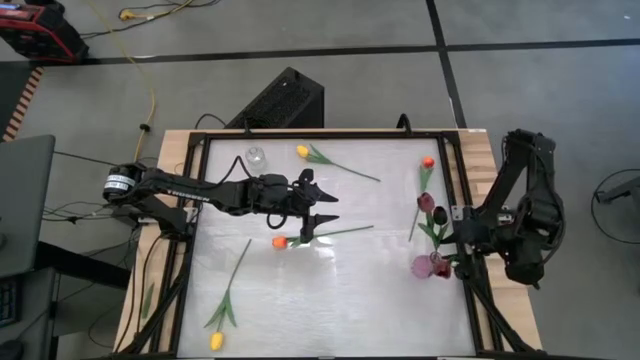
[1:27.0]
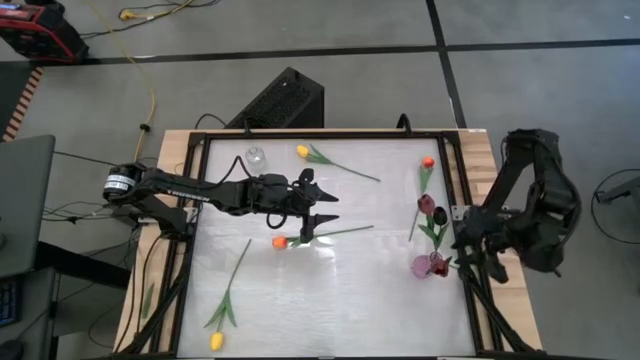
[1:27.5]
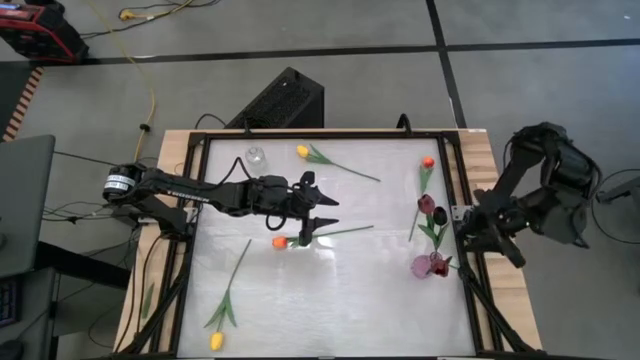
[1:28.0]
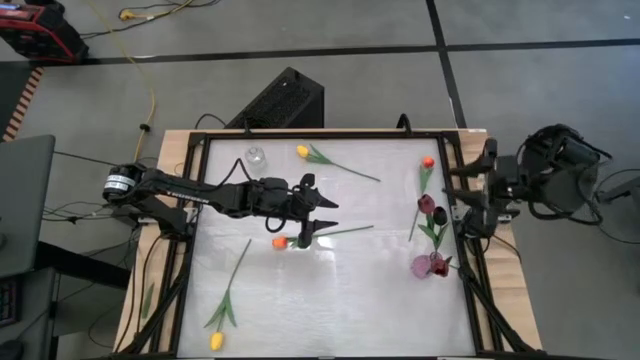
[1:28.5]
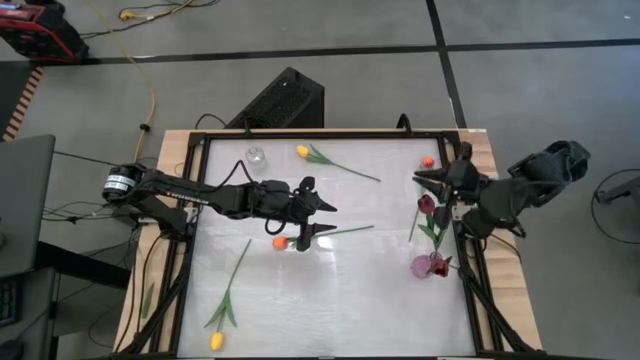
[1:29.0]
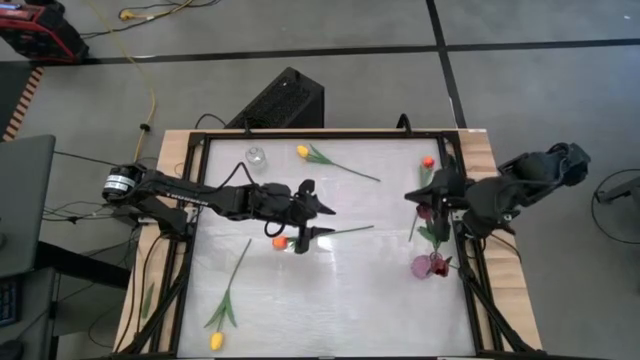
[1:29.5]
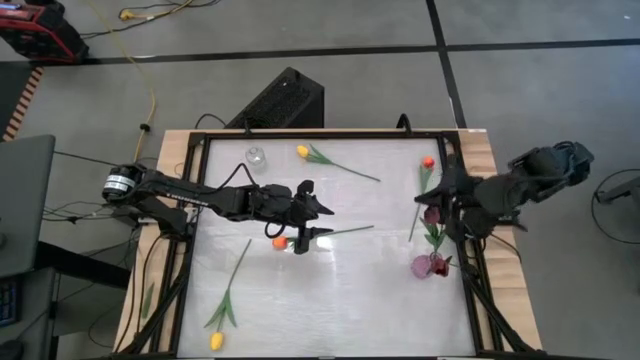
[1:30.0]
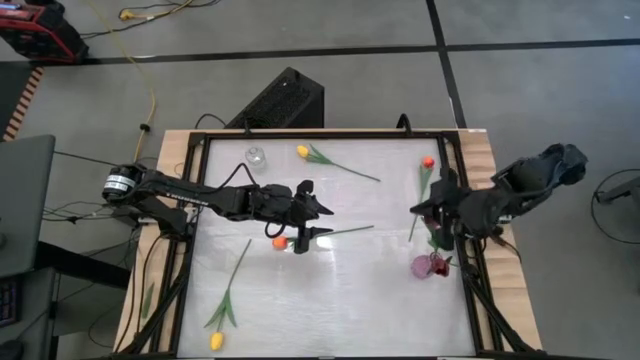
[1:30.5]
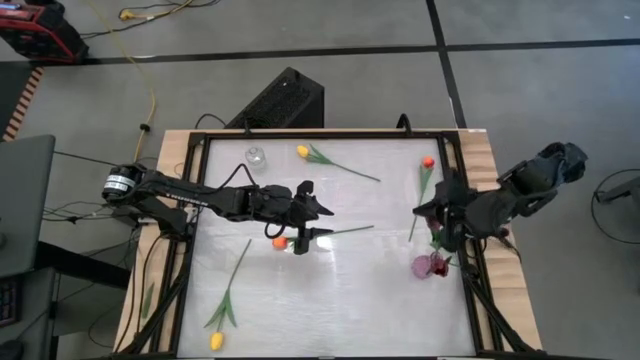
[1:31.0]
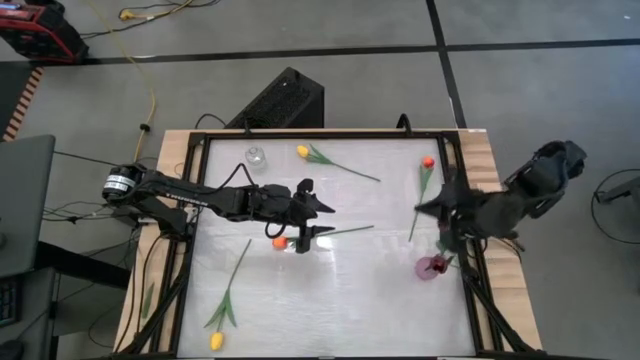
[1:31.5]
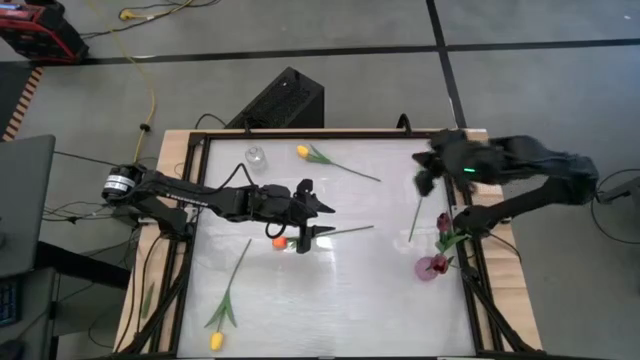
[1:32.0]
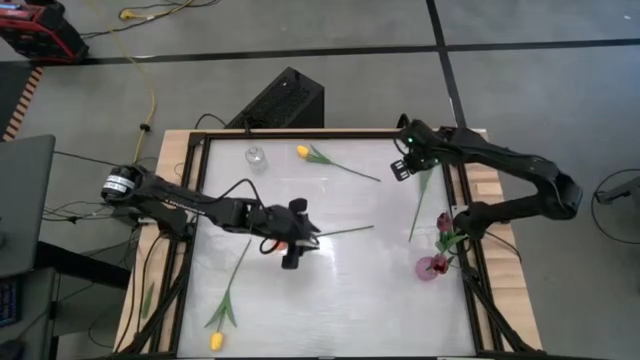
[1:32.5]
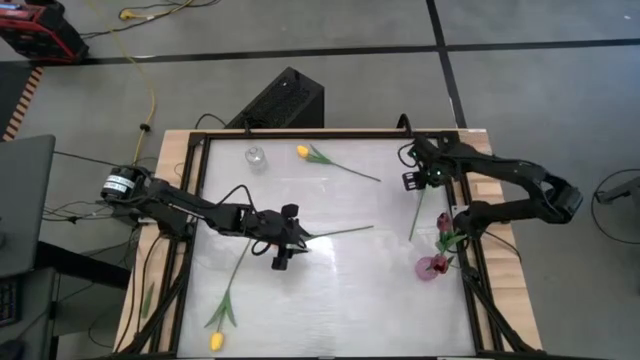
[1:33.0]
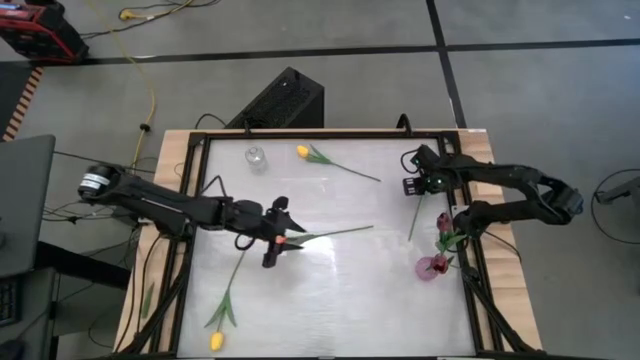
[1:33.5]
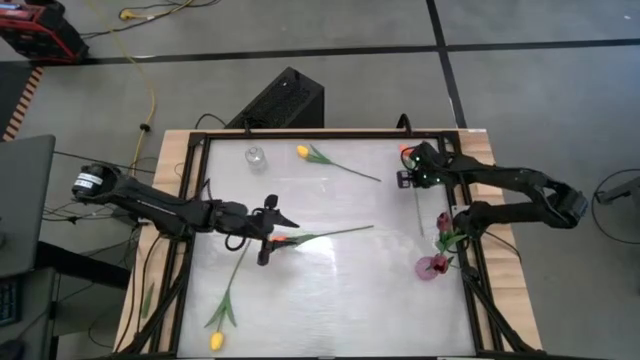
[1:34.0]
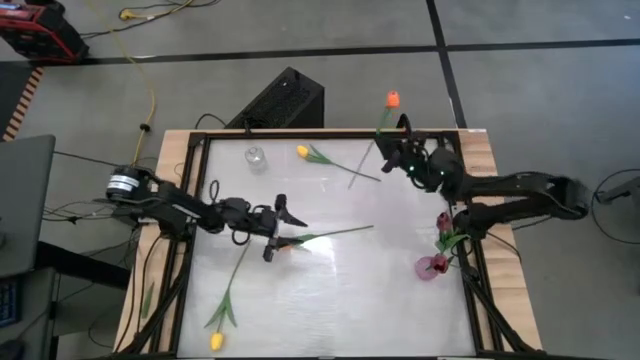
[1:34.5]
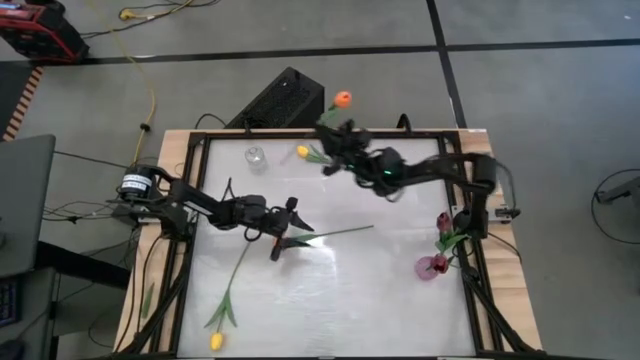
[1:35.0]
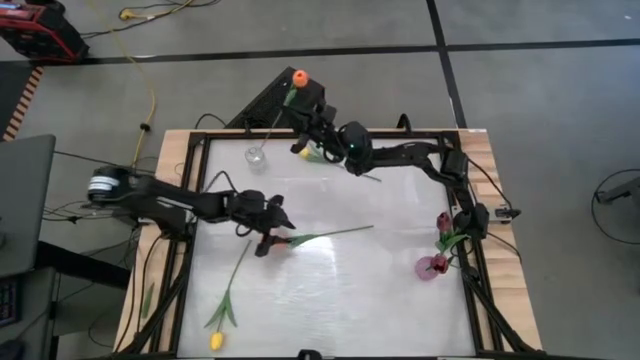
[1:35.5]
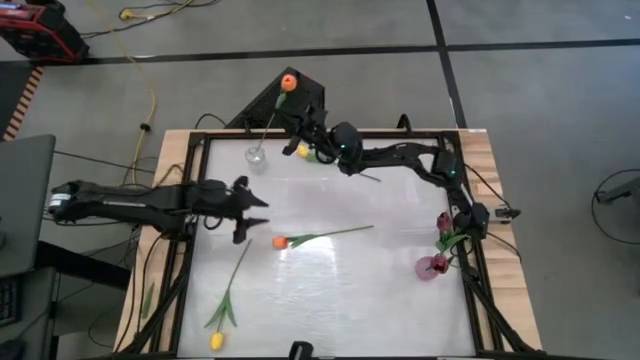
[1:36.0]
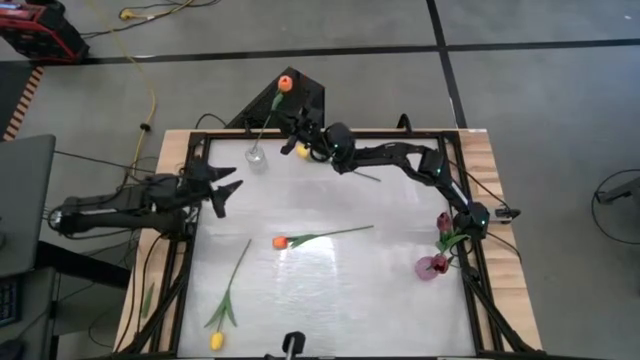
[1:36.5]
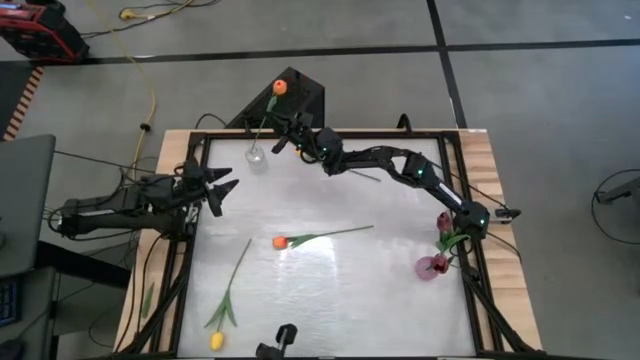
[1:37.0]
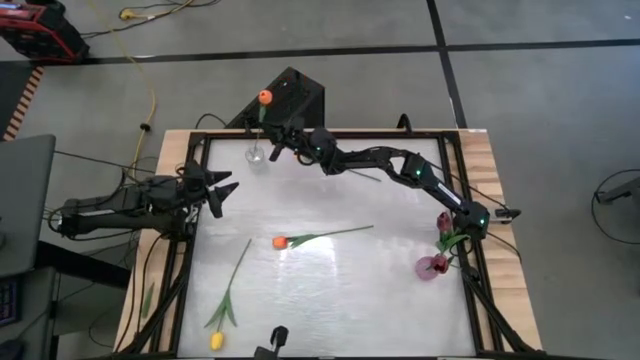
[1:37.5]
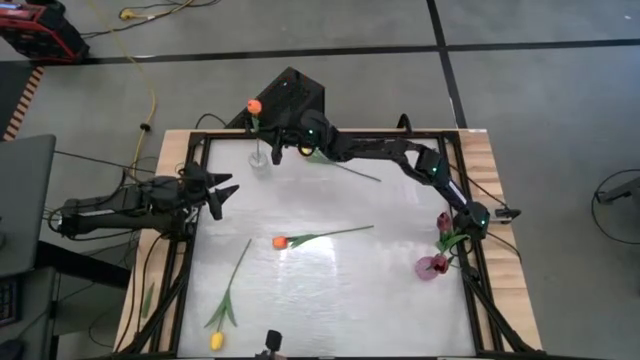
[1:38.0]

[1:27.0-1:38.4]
Task: Sort flowers into vase by color
Put the top orange flower into the transparent vase

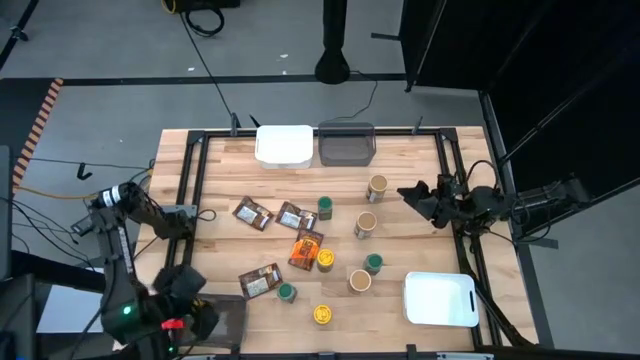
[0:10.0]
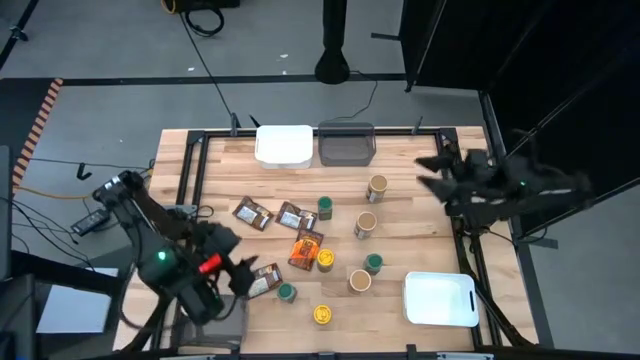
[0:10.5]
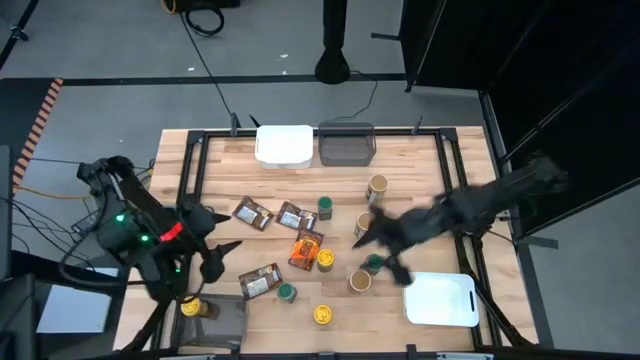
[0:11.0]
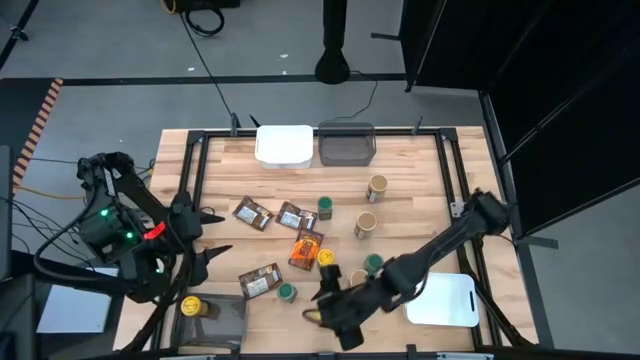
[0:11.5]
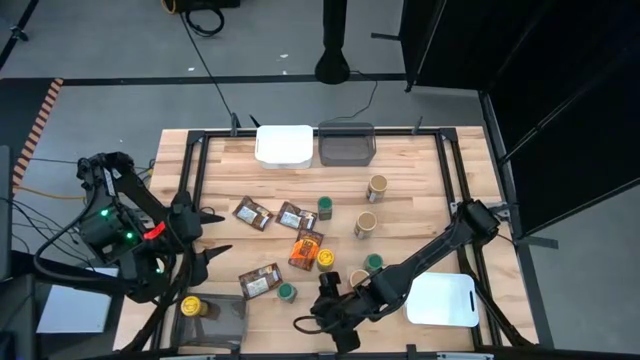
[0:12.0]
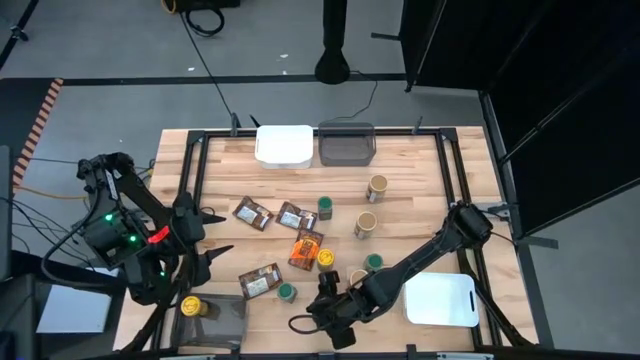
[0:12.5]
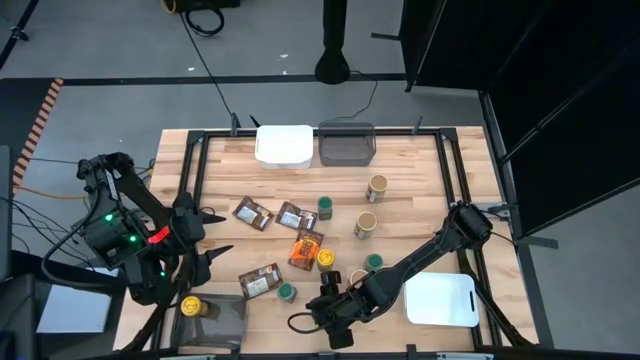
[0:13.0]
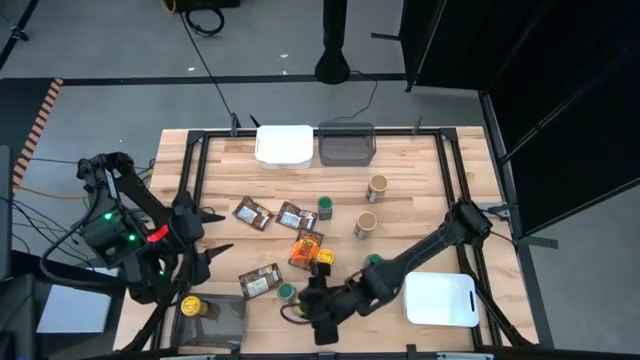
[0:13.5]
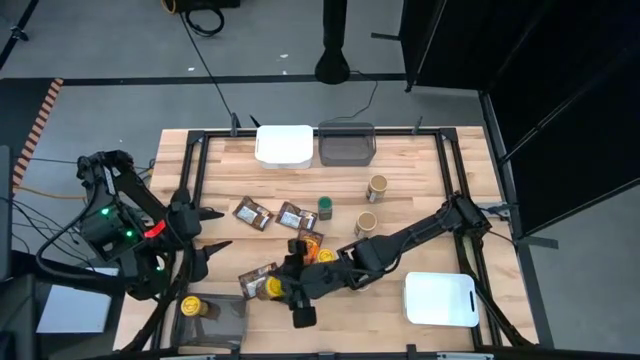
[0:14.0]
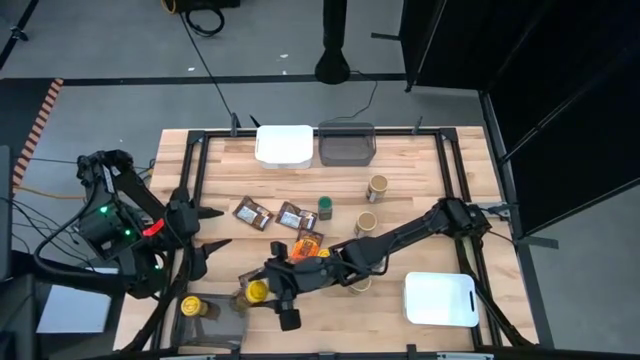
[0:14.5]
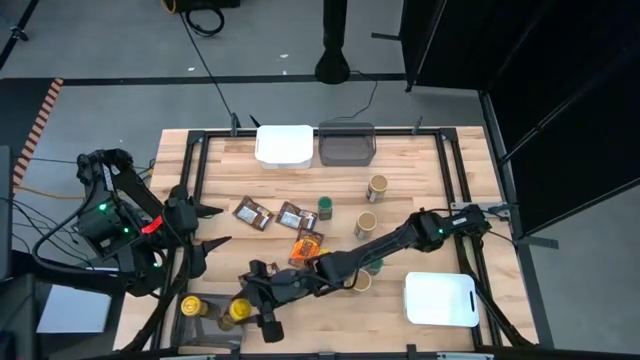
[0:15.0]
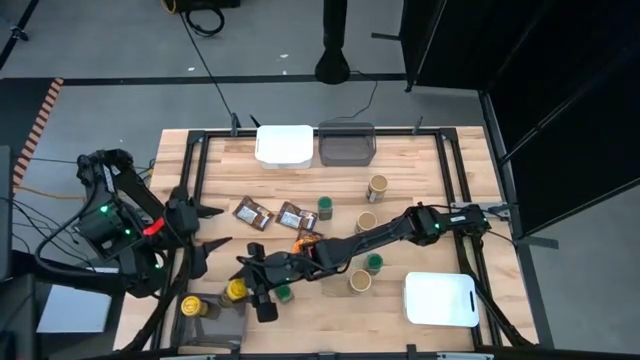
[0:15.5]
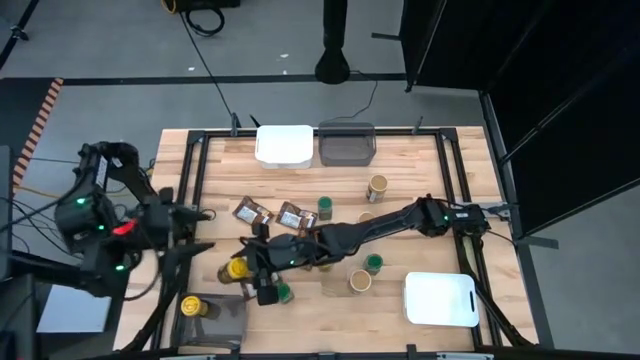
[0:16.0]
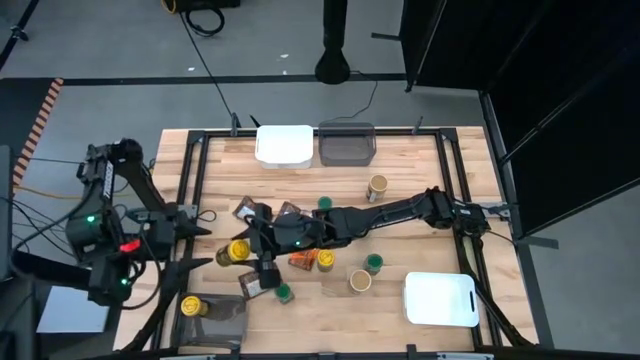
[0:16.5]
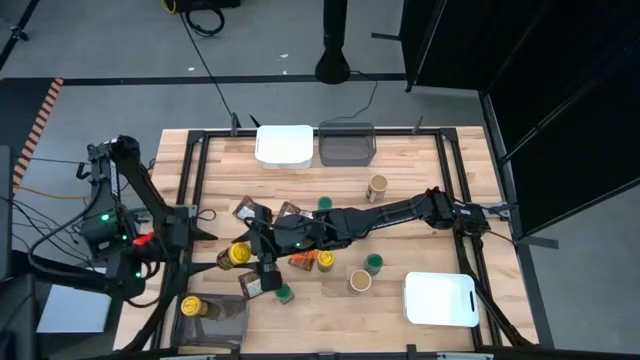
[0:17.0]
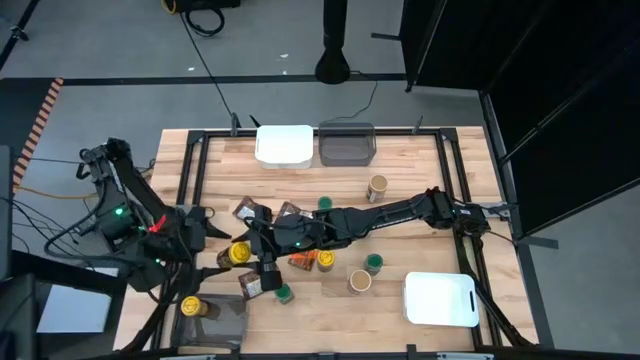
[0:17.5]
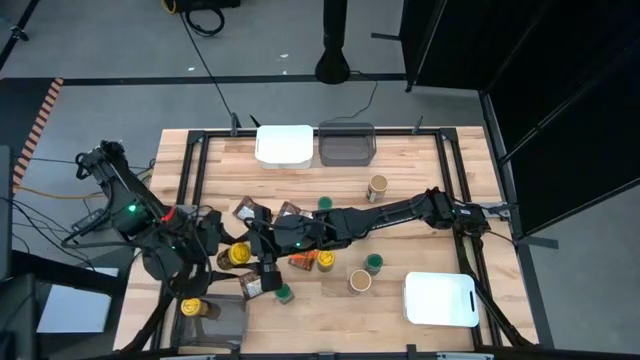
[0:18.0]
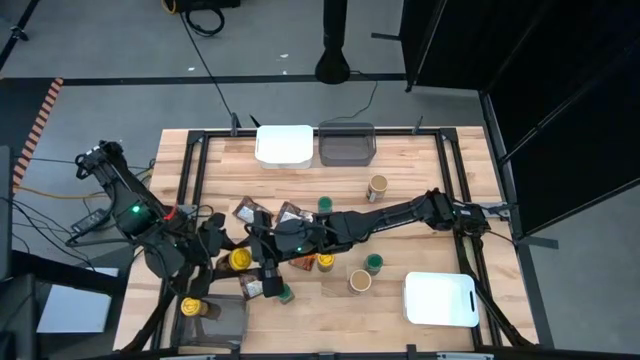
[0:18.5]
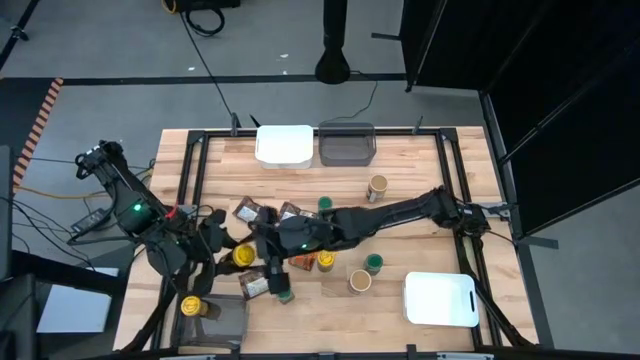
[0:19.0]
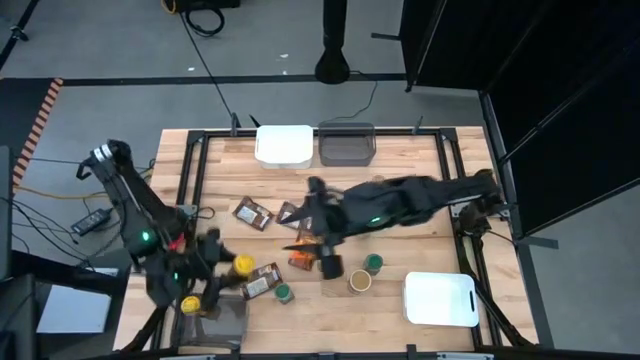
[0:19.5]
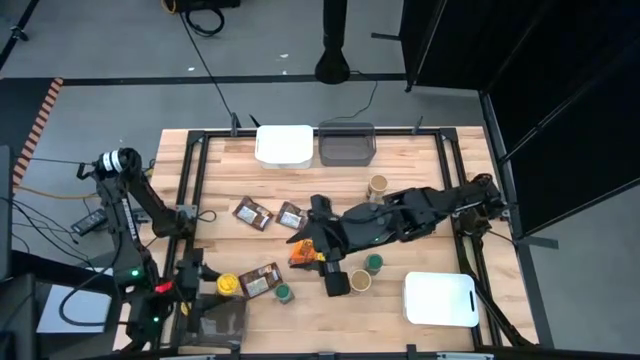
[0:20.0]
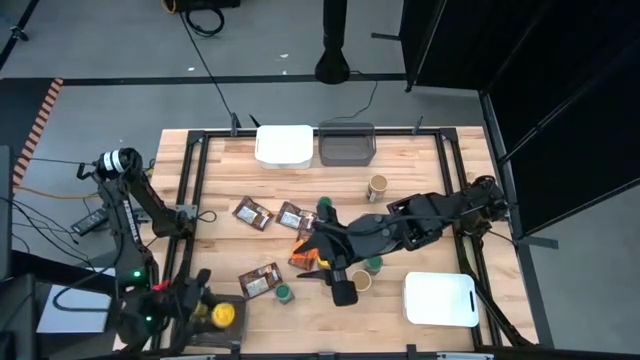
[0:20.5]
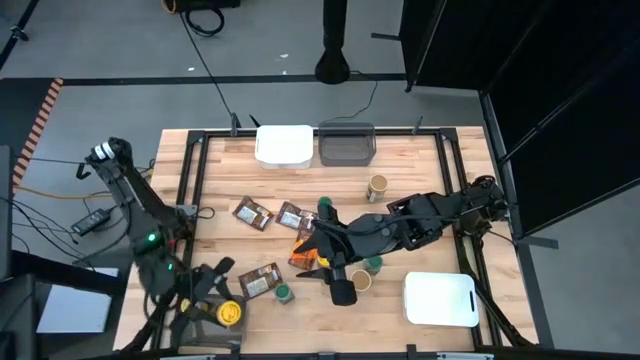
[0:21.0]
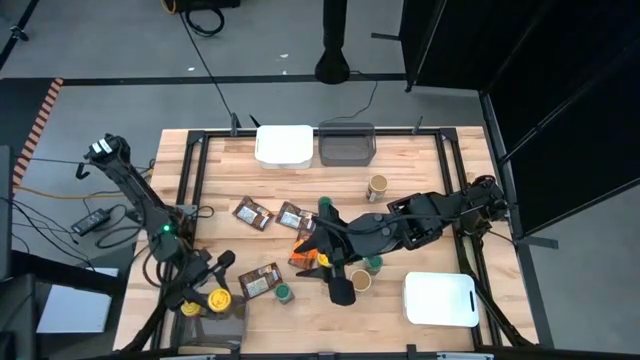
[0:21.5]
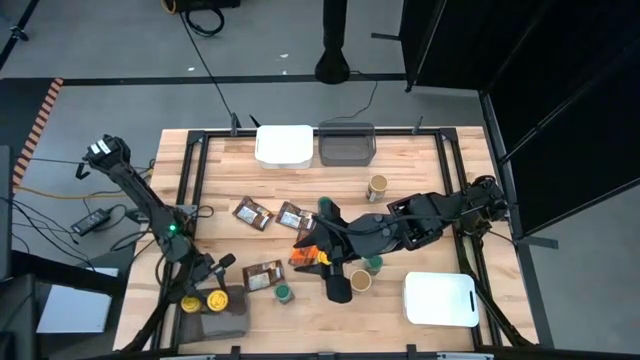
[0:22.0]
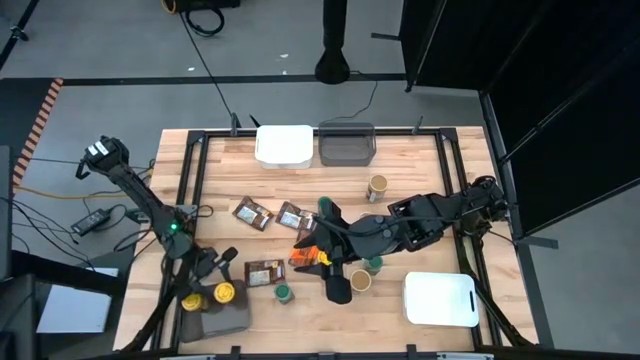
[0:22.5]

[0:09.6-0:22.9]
Task: Sort spices by type
Put the yellow seasoning bottle into the bottom black bin
